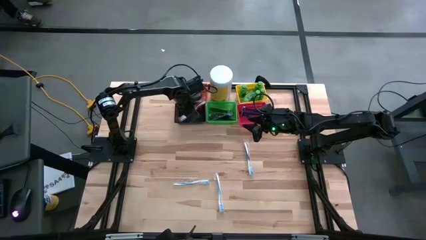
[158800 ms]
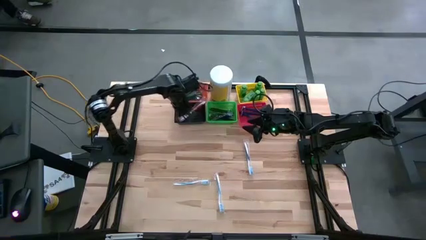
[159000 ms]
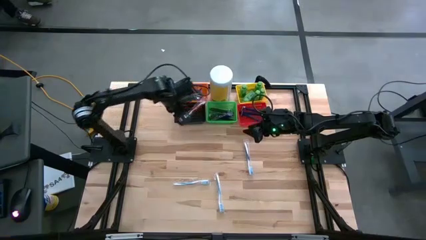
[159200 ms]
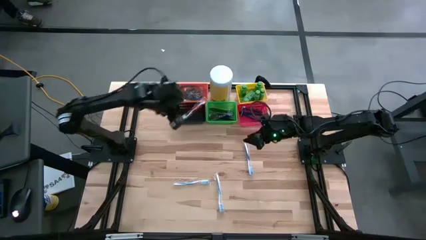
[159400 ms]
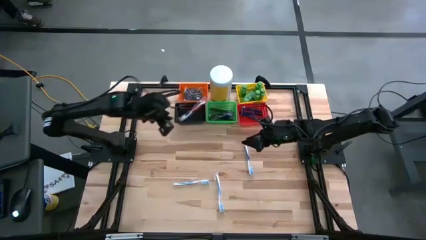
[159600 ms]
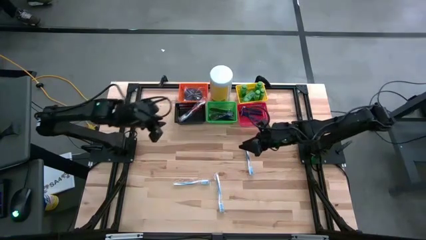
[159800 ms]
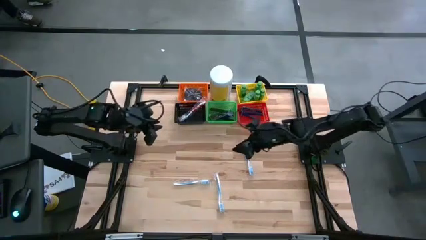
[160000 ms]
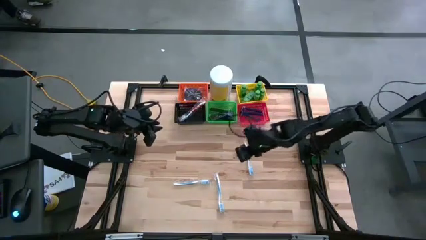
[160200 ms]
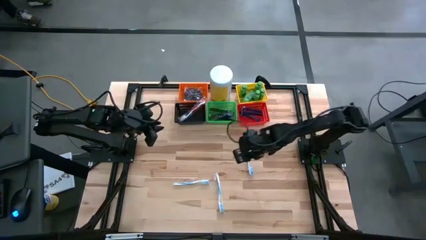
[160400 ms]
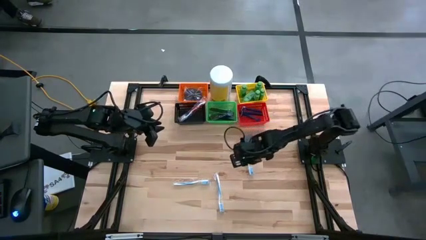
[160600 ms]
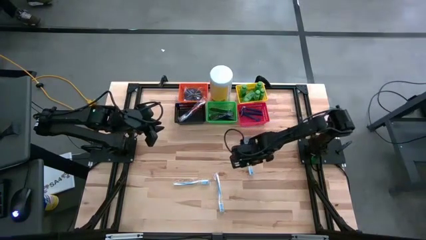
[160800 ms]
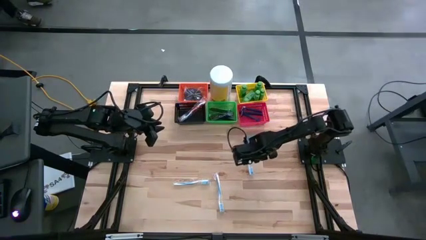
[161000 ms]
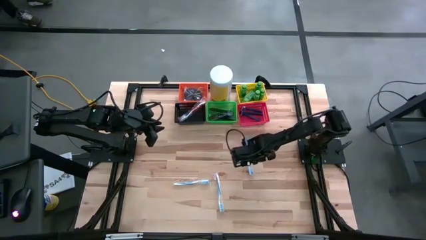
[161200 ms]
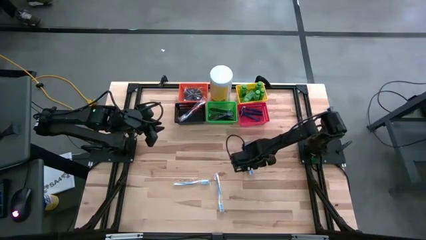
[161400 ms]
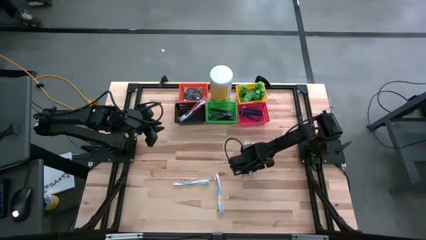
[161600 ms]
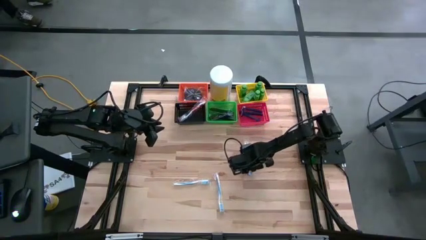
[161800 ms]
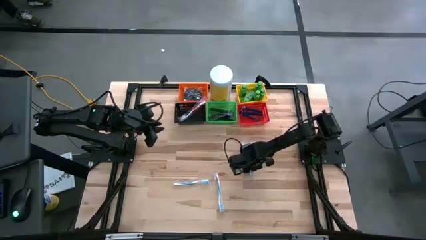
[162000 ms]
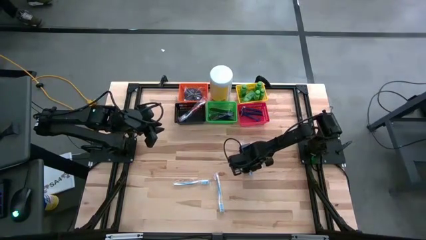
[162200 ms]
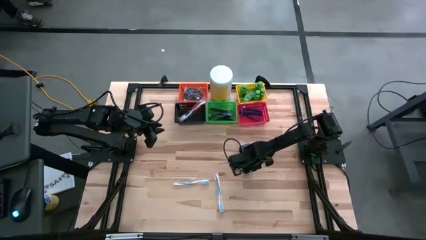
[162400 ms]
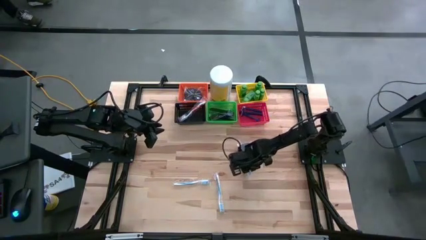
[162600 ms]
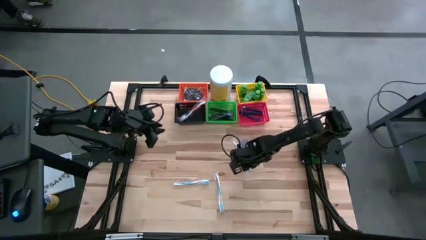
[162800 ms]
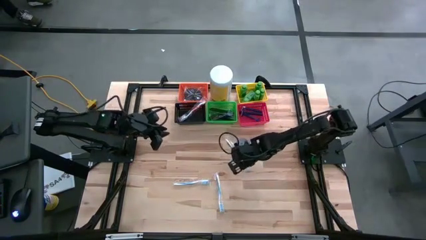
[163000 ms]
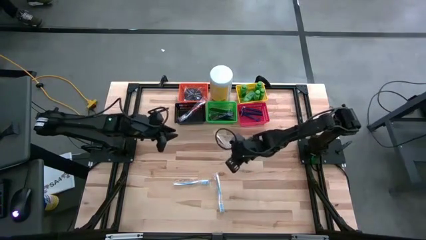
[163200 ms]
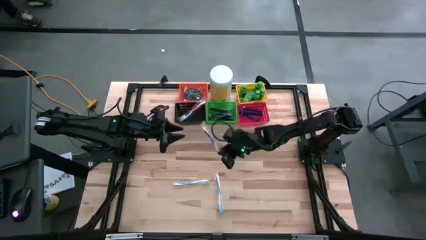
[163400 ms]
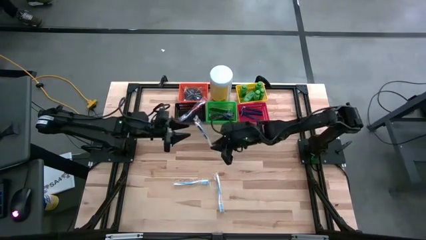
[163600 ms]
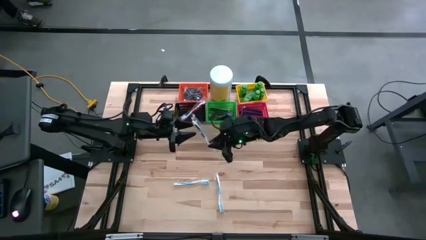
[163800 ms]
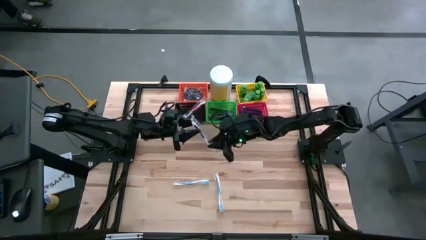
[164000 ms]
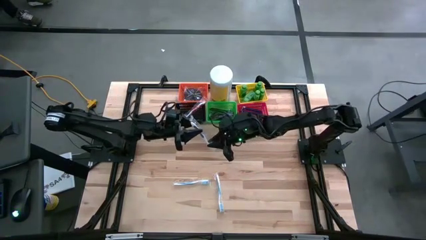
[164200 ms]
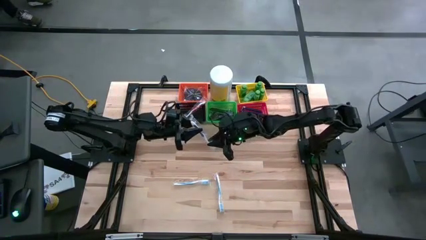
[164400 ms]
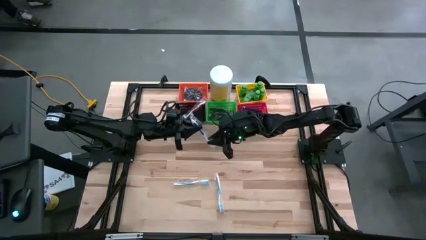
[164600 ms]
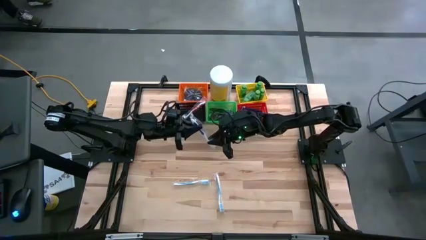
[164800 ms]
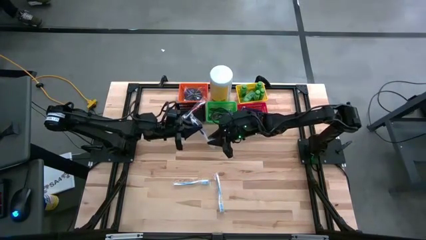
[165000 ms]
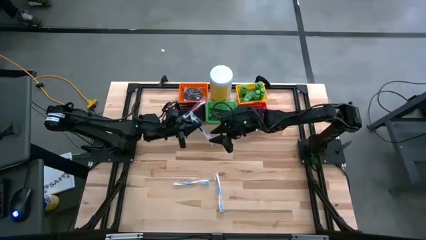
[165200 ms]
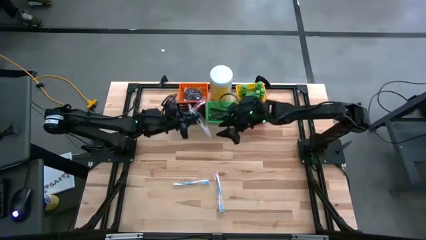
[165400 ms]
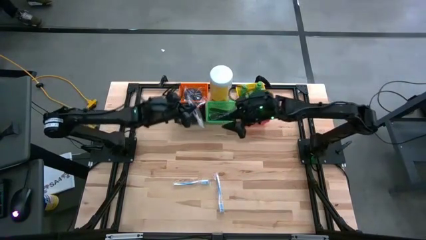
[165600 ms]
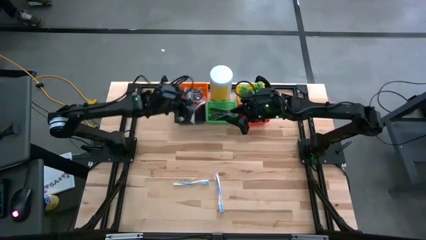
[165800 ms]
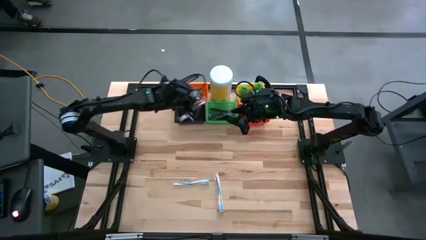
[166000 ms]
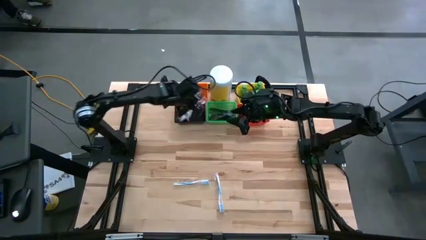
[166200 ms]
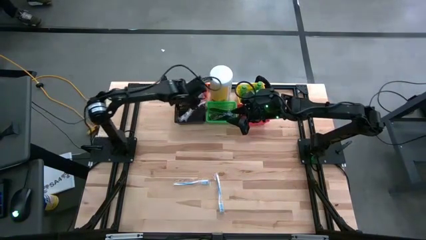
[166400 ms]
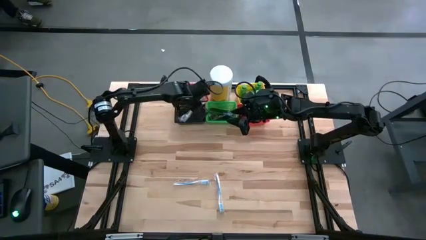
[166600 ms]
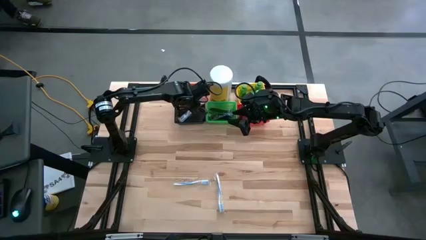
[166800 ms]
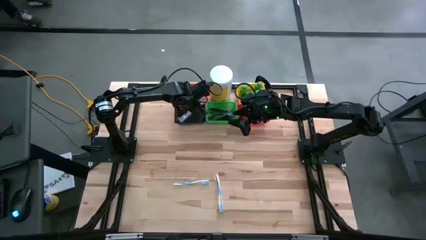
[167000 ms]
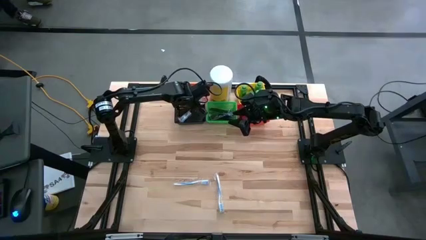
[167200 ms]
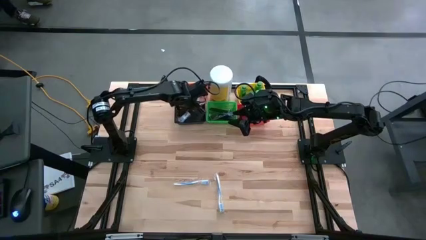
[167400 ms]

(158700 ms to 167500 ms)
Task: Pick & Place Travel size toiletries
Put the blue toothbrush into the black bin

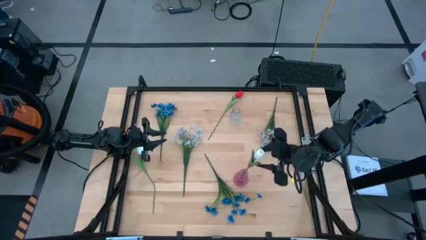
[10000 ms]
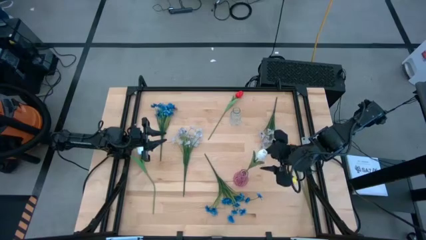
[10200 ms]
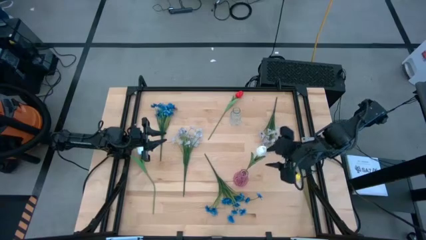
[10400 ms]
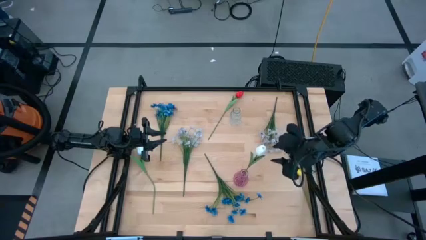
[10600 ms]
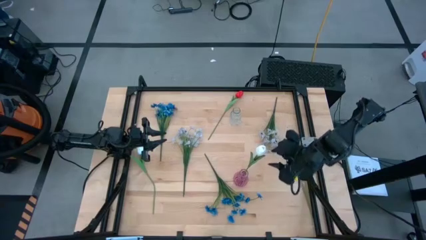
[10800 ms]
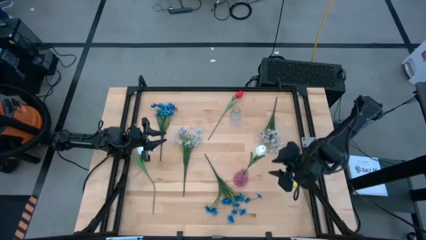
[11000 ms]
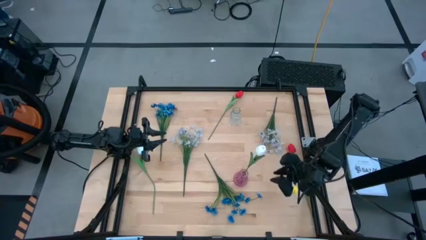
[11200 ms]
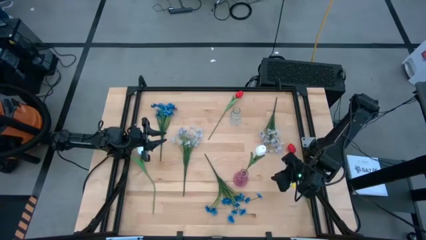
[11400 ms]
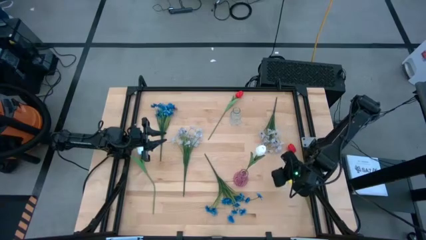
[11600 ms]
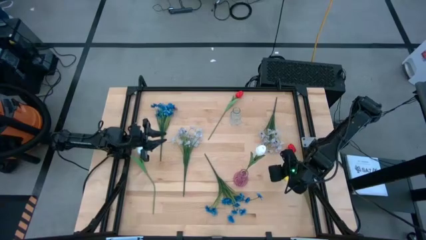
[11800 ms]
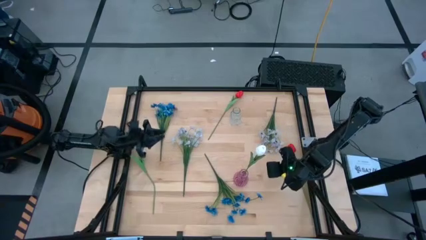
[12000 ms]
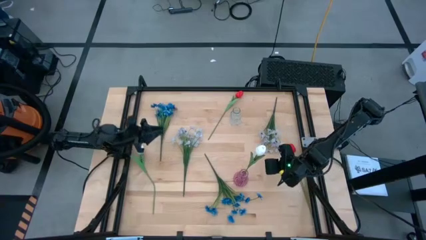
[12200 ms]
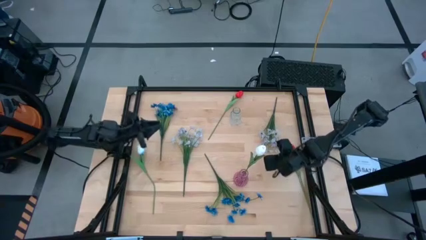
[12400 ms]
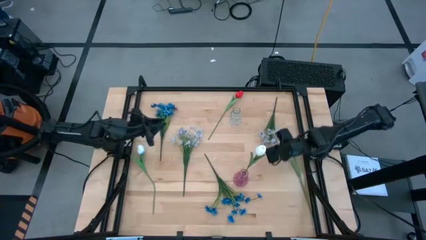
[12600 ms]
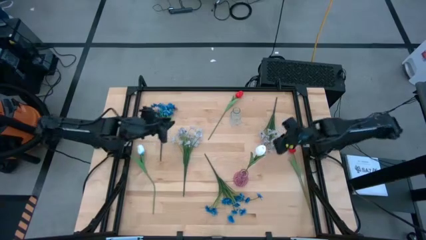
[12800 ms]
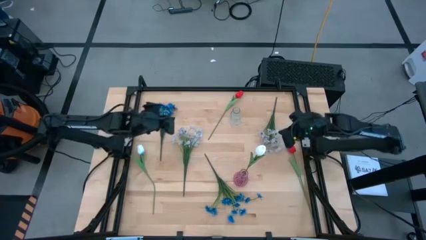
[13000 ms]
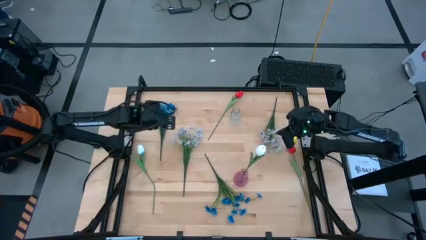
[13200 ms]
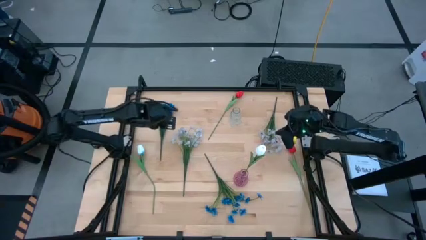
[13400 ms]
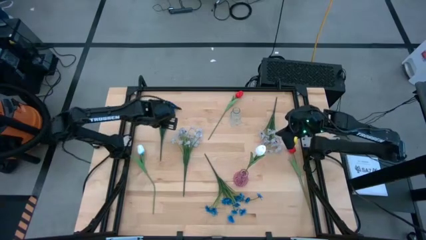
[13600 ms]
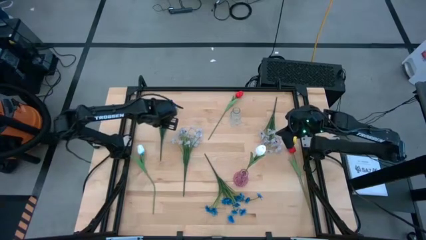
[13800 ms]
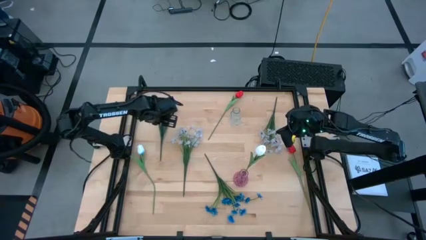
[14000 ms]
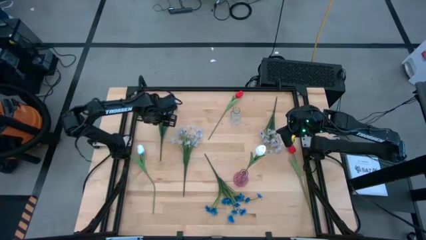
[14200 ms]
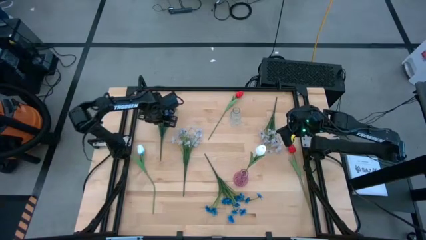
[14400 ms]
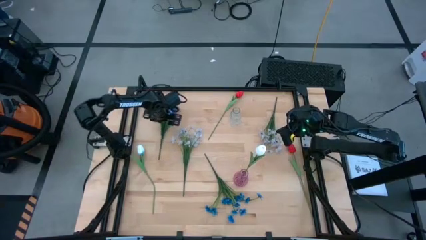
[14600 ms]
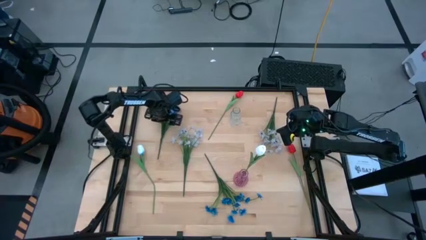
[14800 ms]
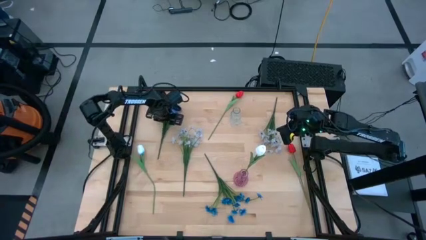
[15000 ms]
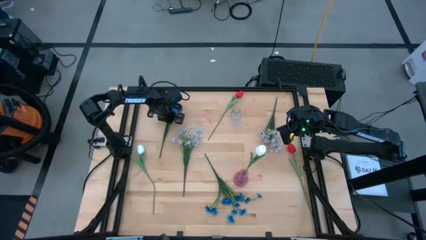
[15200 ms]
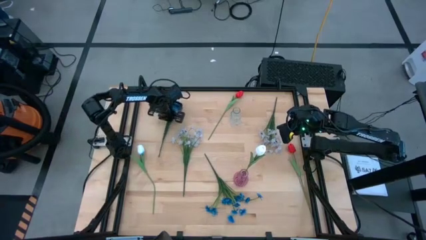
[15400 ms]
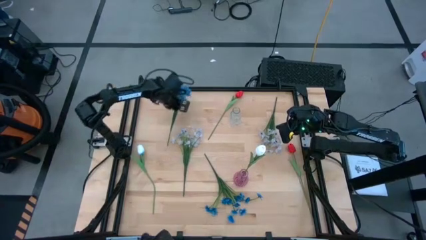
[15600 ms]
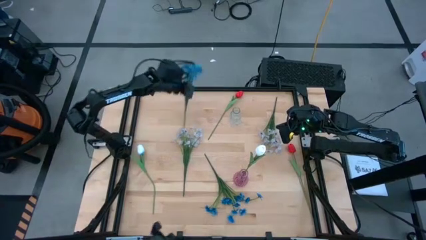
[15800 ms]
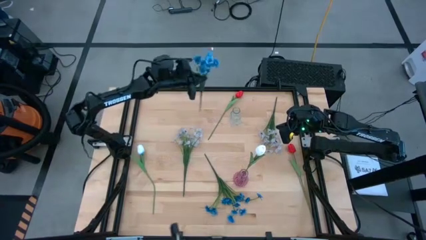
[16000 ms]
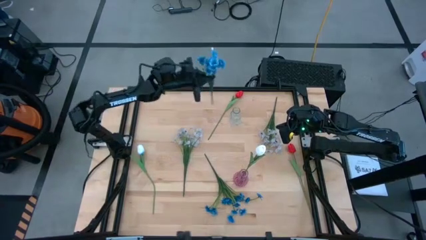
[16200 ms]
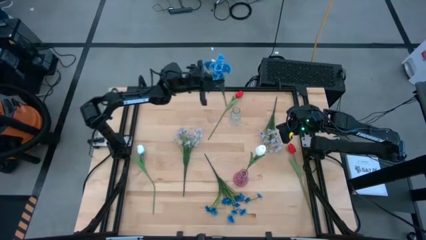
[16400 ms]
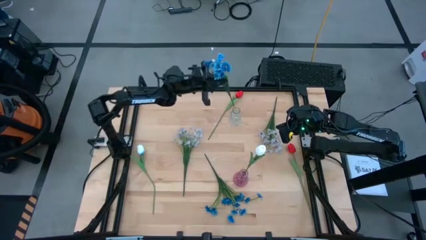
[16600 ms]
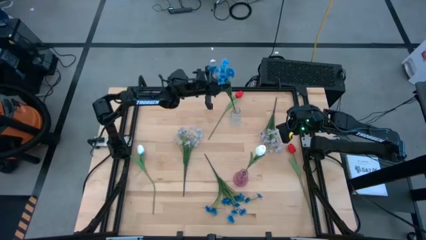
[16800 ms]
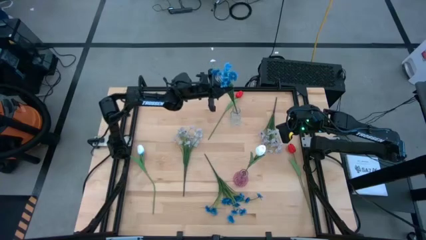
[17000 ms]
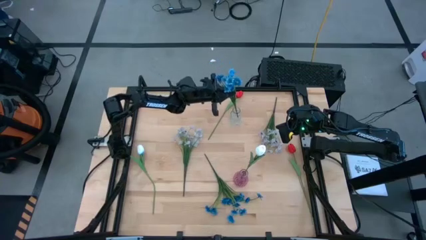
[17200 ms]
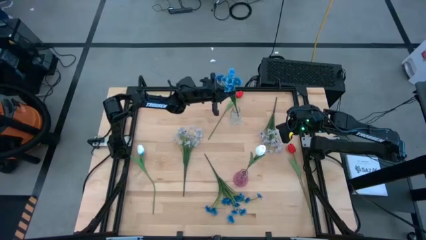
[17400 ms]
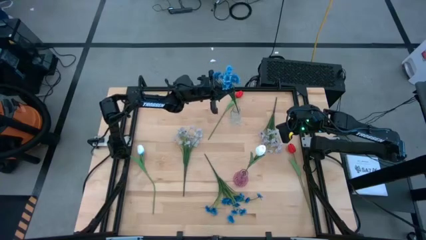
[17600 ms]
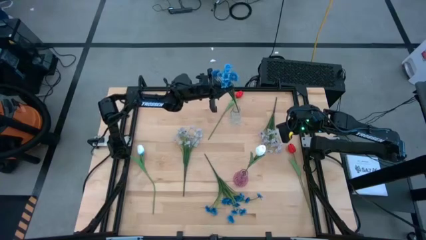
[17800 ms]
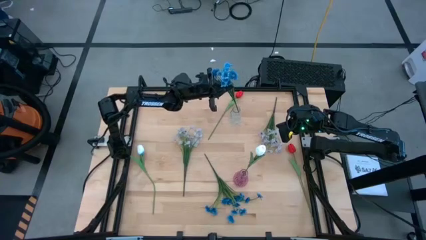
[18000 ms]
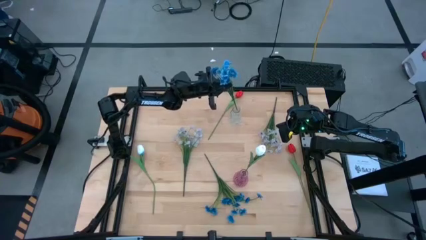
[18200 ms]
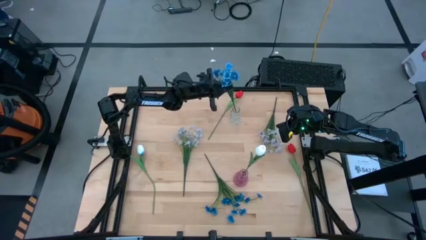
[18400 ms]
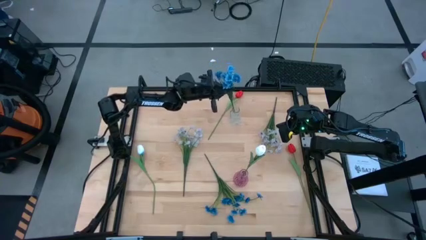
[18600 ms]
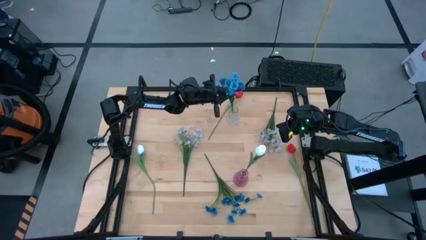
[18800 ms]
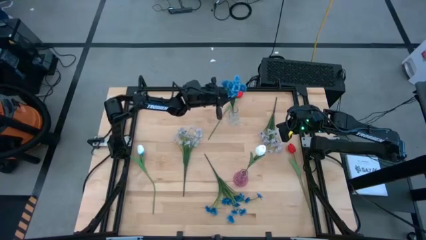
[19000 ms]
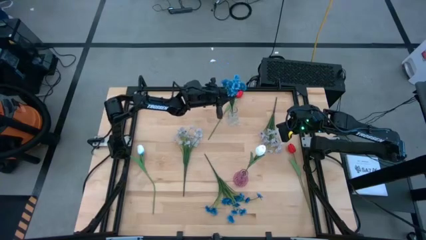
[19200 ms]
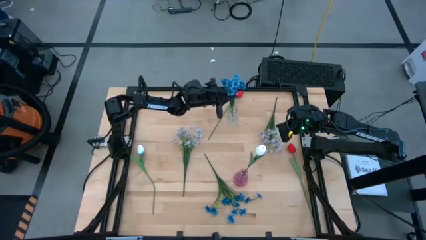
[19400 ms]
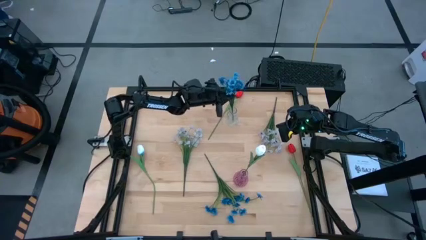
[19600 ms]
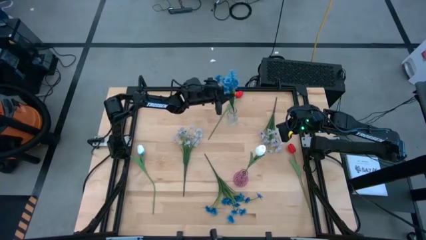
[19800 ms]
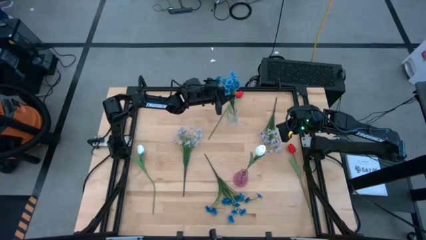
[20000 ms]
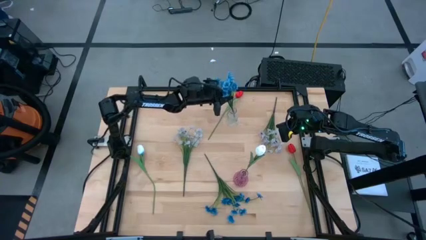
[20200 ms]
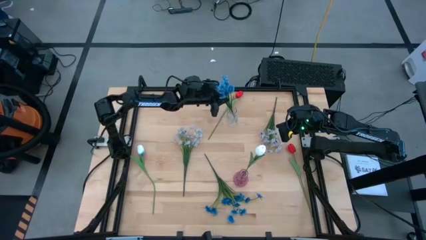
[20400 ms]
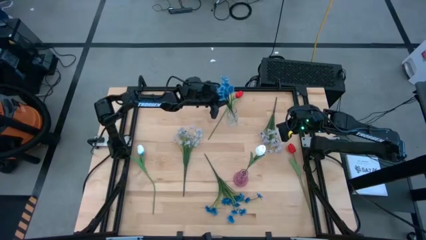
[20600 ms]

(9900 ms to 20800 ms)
Task: Sort flowers into vase by color
Put the top blue flowers into the transparent vase
